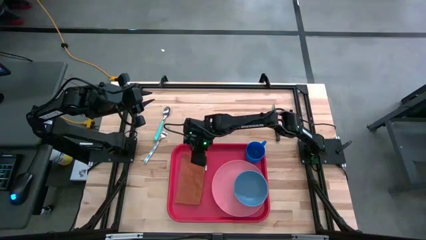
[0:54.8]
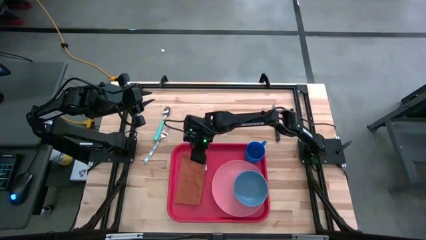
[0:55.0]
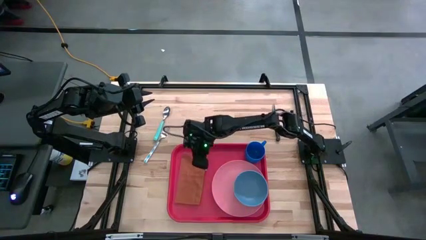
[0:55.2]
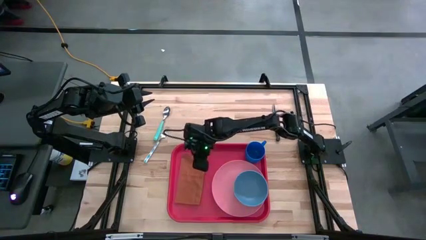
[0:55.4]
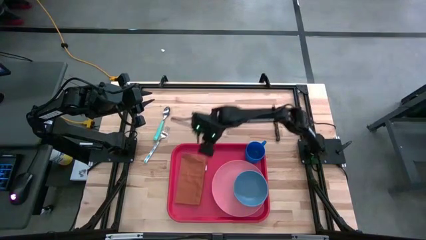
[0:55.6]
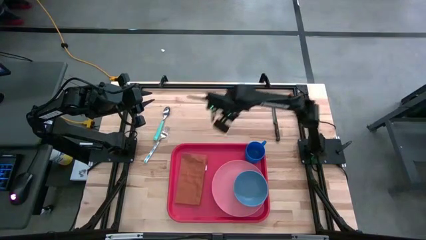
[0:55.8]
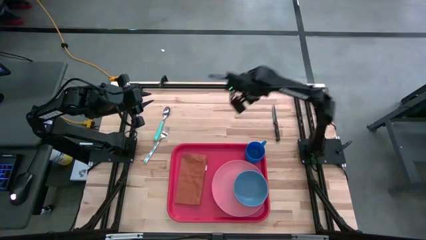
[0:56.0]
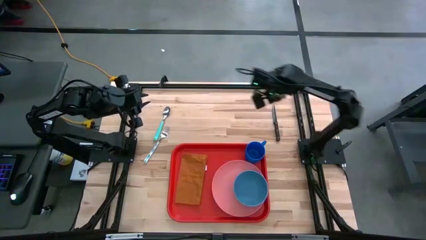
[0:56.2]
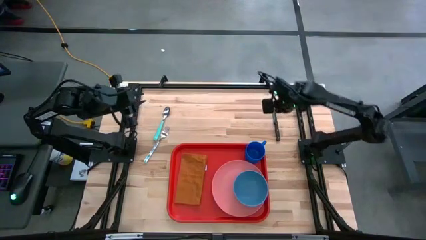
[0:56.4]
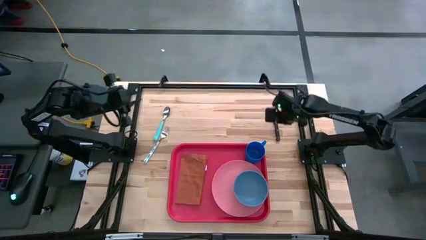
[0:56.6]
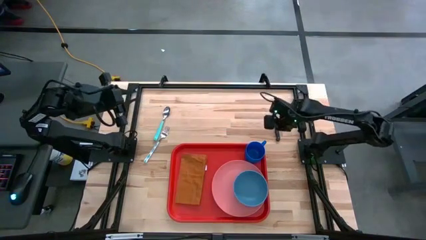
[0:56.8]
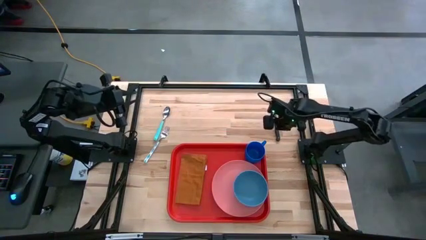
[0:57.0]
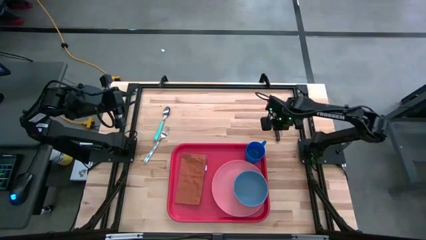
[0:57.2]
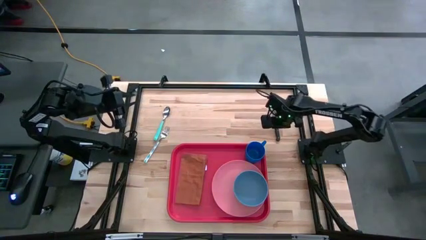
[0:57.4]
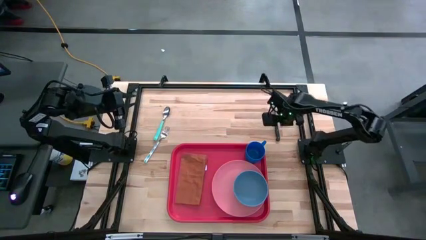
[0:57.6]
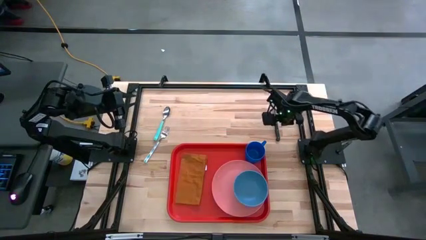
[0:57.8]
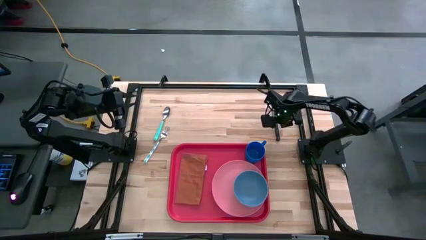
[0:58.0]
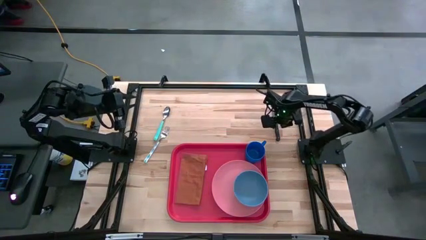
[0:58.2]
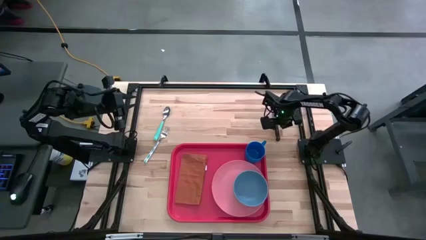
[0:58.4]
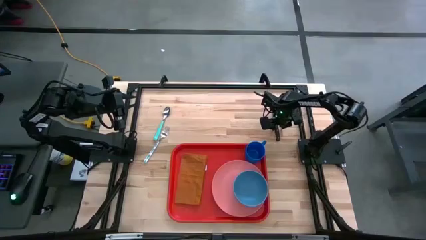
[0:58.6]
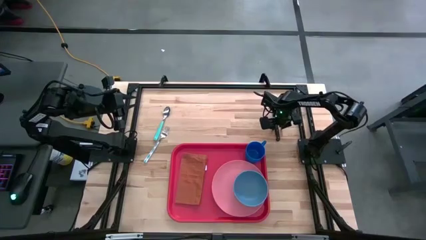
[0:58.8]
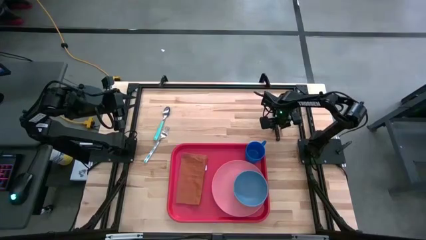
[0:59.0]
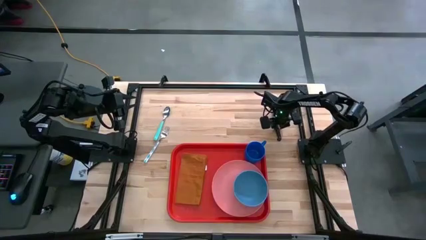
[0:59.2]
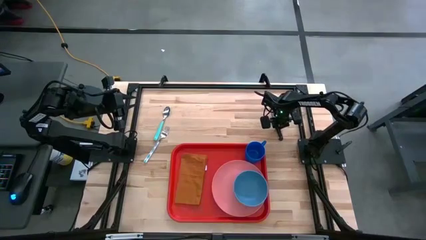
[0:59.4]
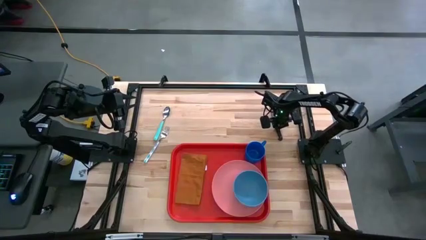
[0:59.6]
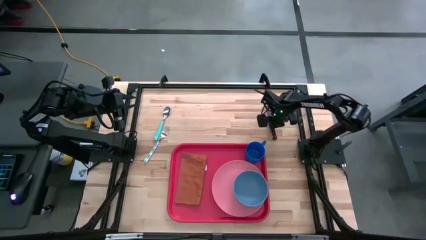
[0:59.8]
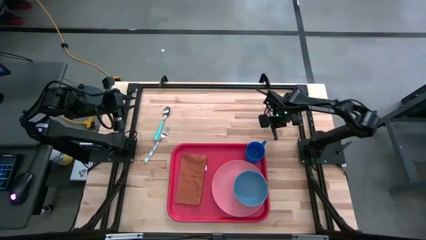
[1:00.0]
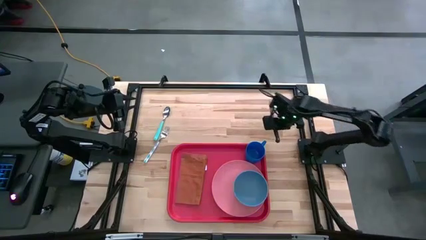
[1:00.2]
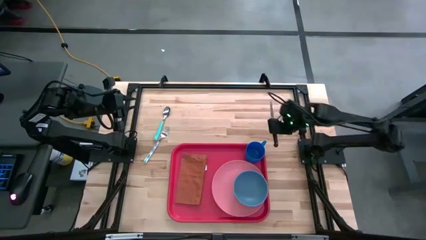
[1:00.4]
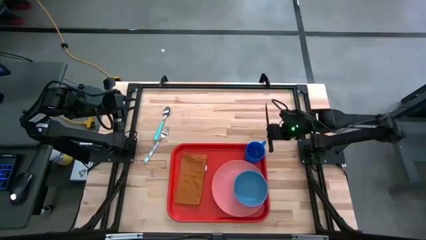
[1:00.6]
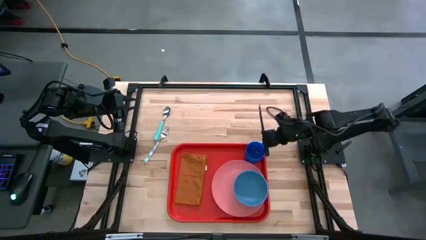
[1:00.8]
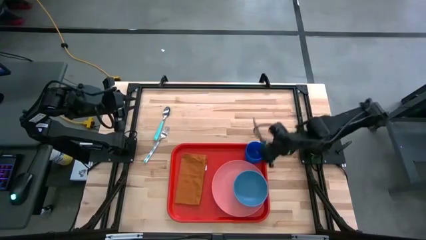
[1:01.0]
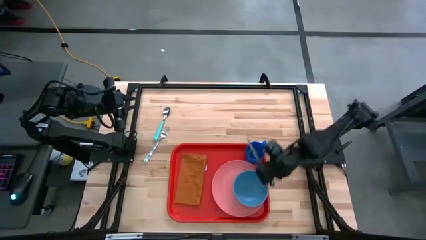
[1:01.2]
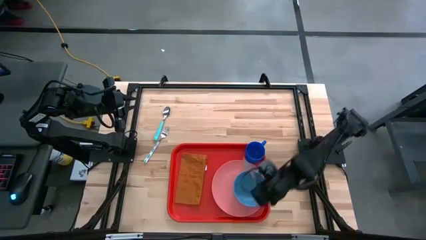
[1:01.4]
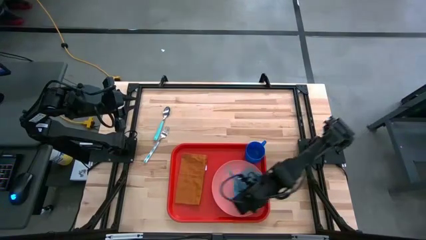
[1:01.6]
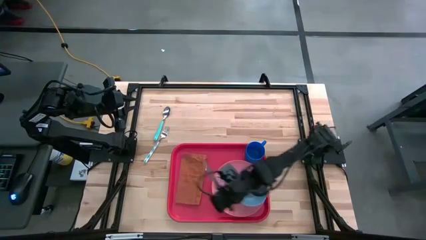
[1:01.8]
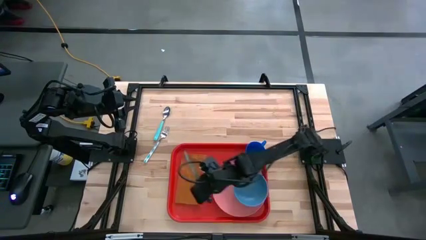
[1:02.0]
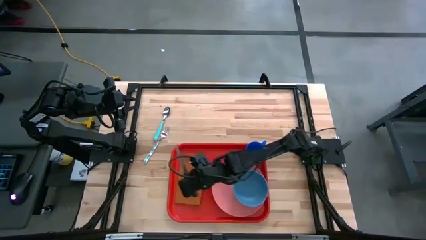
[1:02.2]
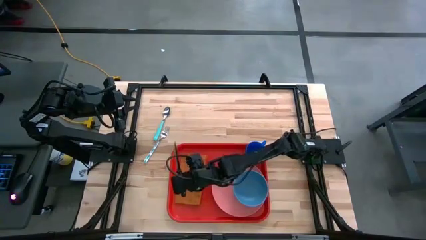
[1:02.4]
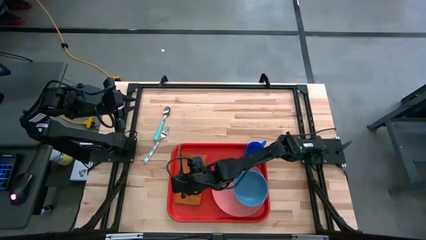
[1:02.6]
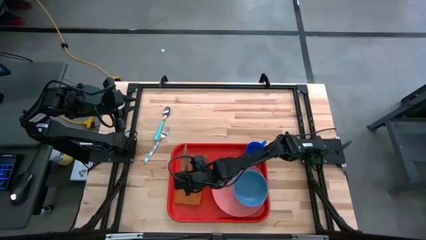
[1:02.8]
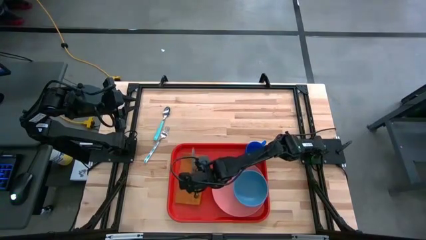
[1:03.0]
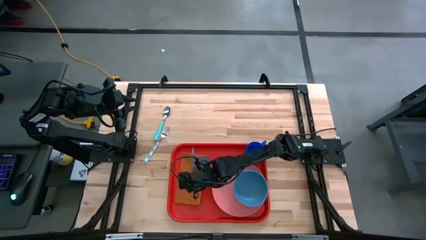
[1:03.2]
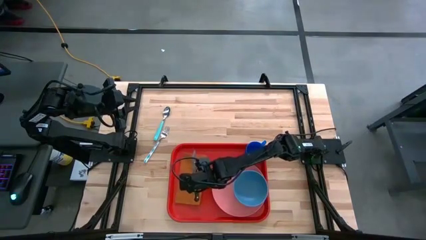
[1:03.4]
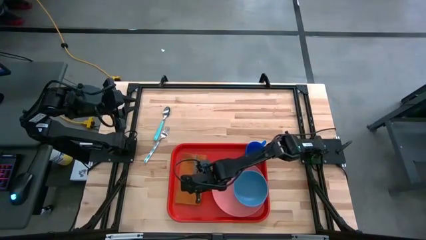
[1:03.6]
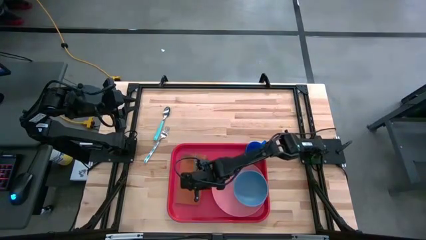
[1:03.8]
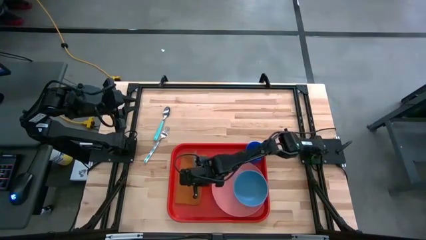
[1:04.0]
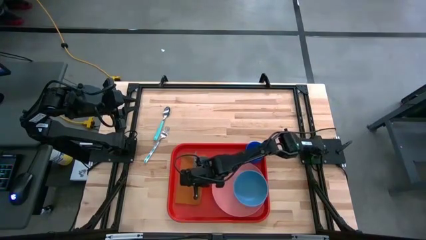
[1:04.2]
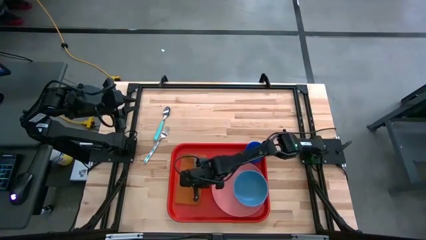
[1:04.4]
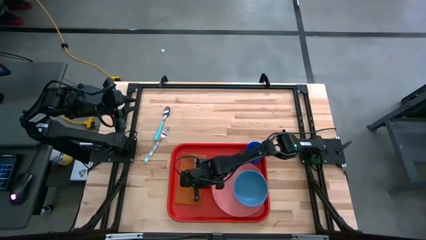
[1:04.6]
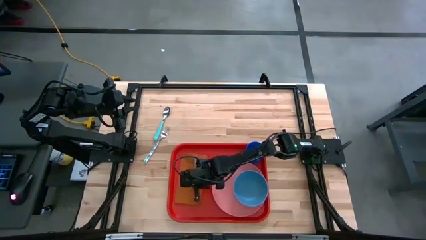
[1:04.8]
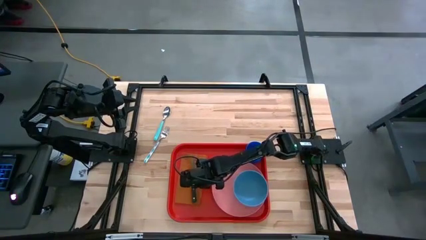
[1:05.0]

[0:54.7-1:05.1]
Task: Set up tray
Put the black bread knife on the orange napkin
